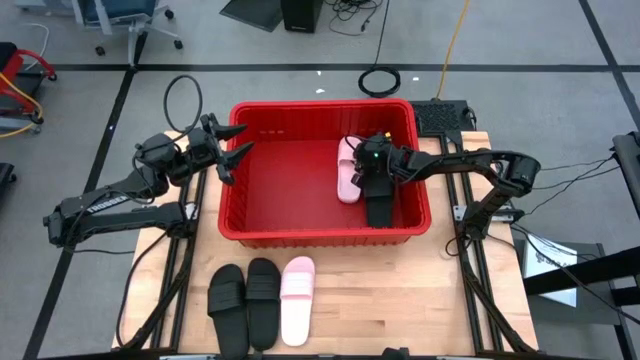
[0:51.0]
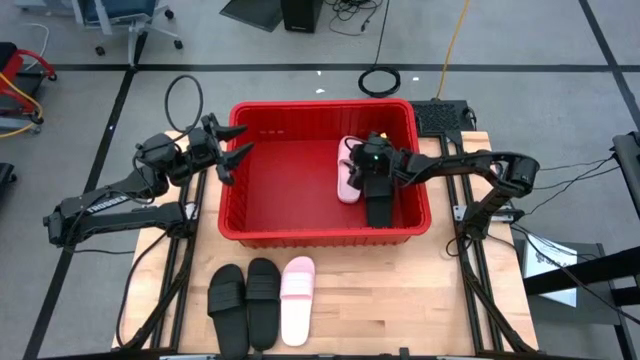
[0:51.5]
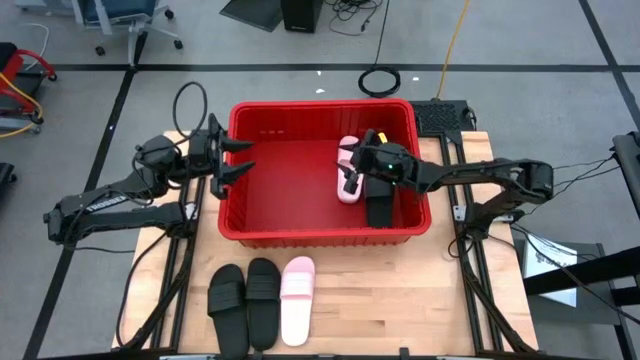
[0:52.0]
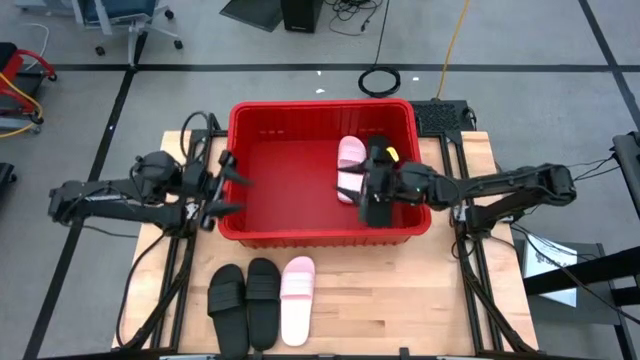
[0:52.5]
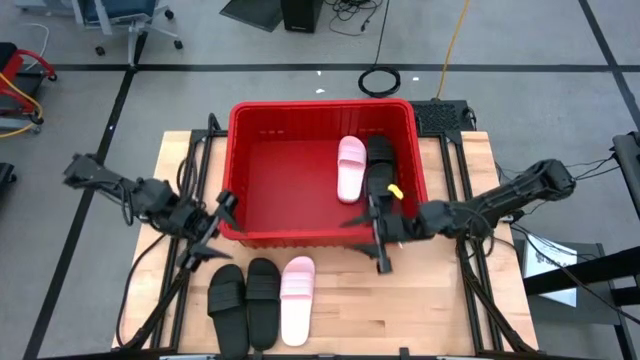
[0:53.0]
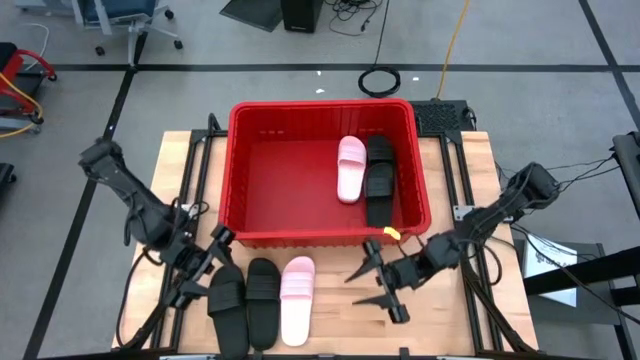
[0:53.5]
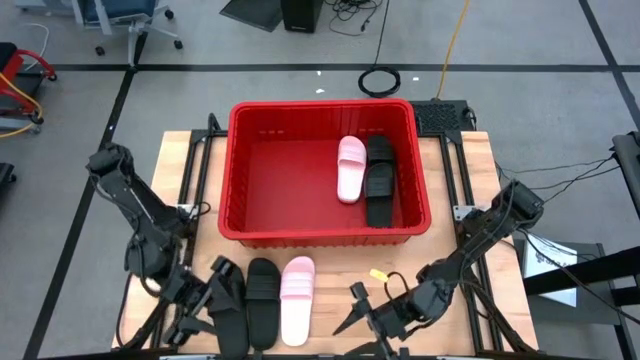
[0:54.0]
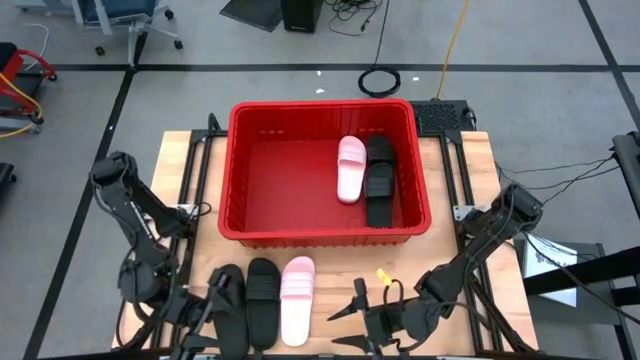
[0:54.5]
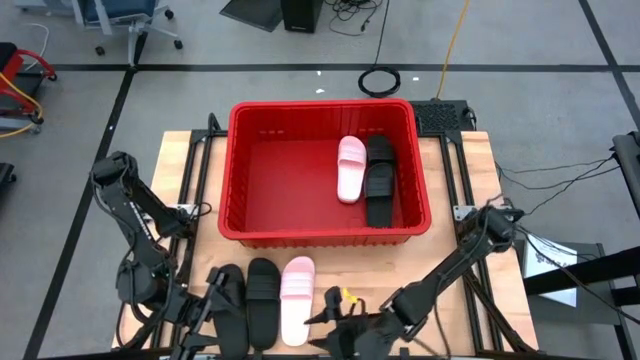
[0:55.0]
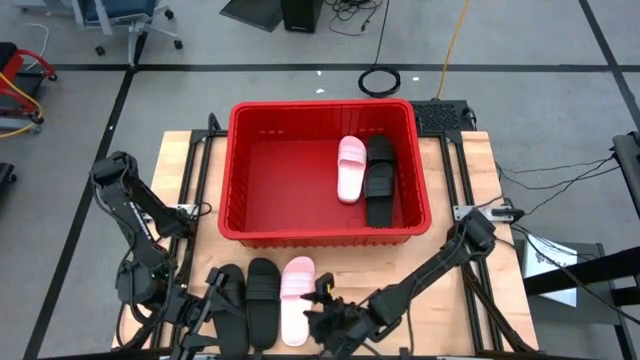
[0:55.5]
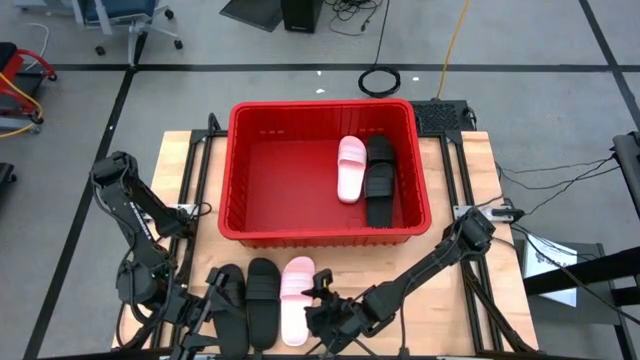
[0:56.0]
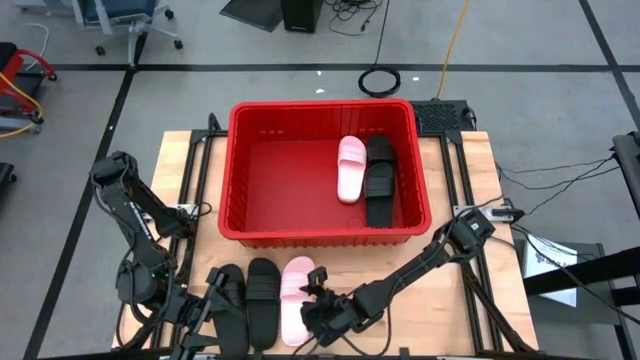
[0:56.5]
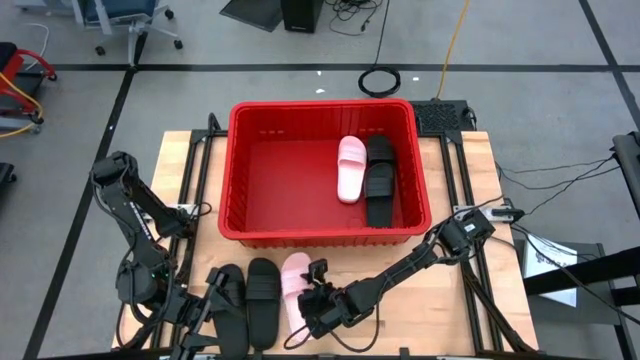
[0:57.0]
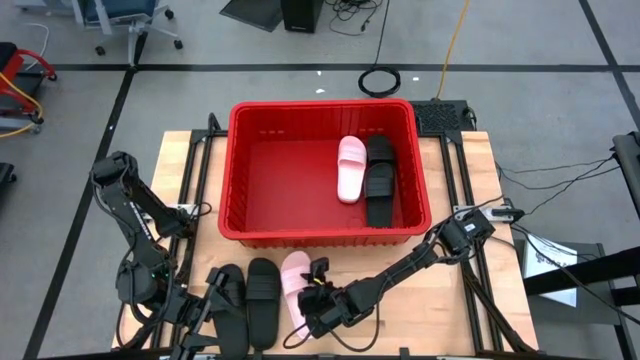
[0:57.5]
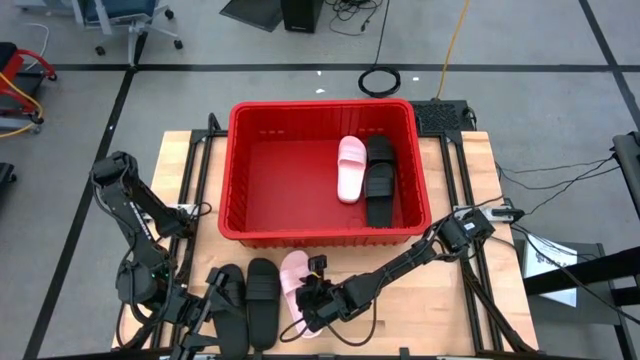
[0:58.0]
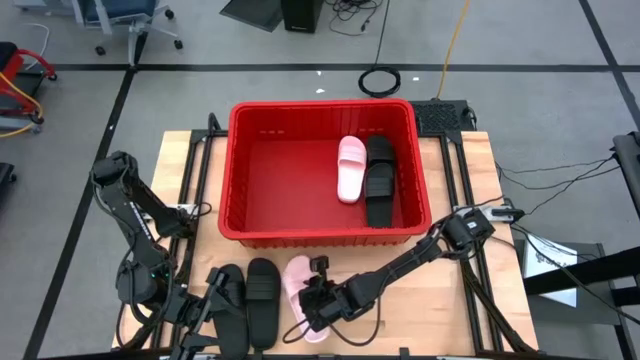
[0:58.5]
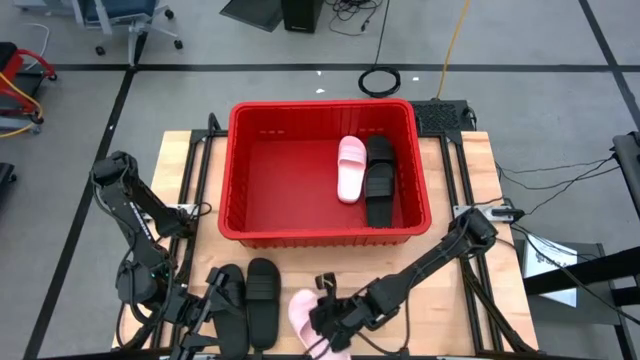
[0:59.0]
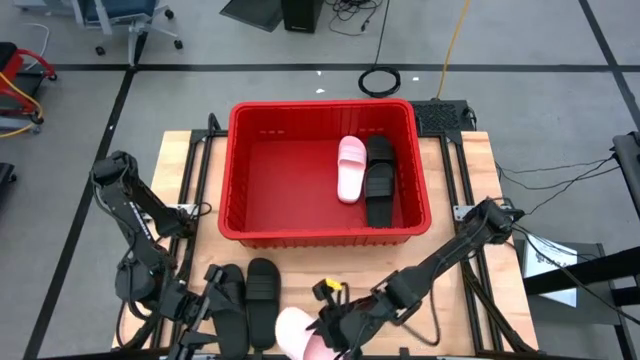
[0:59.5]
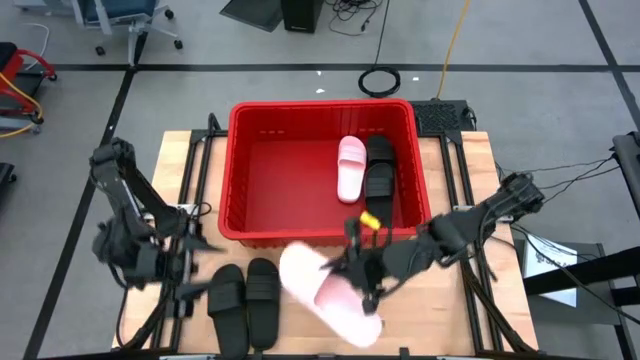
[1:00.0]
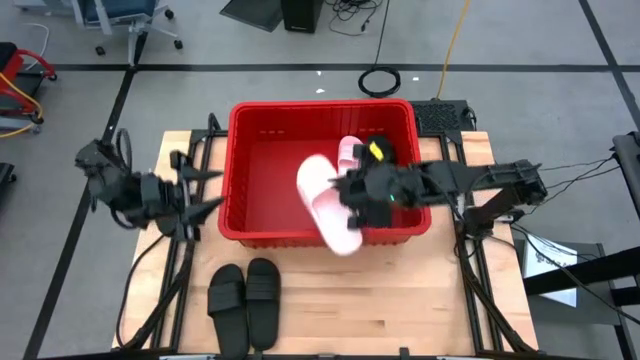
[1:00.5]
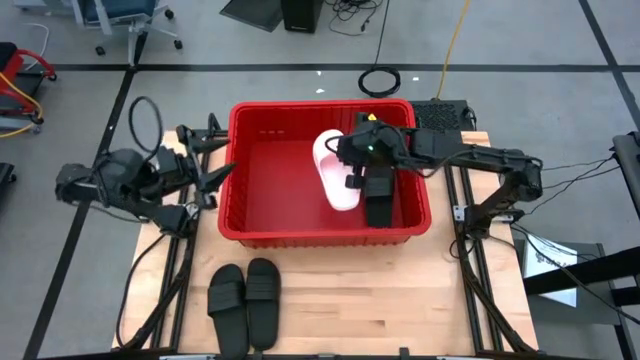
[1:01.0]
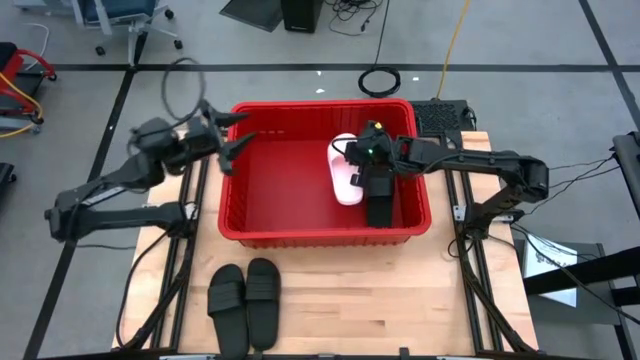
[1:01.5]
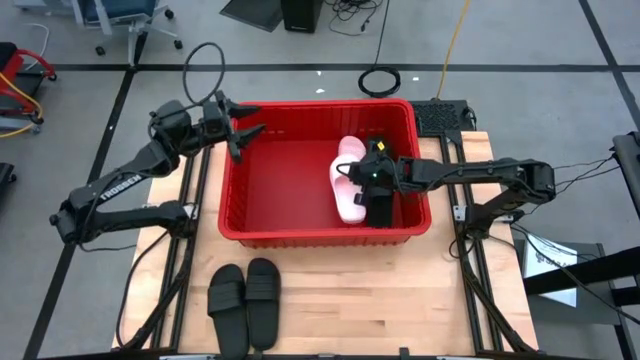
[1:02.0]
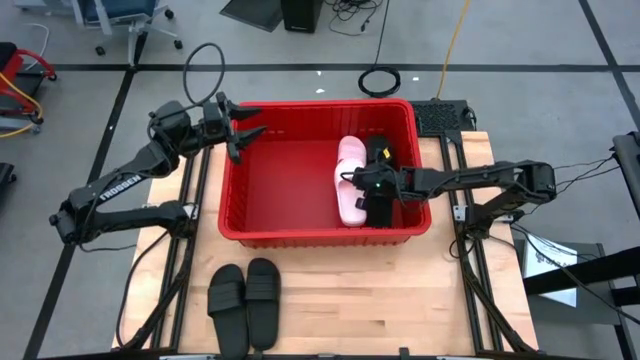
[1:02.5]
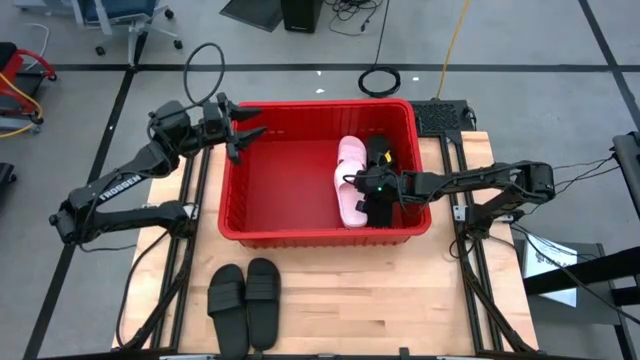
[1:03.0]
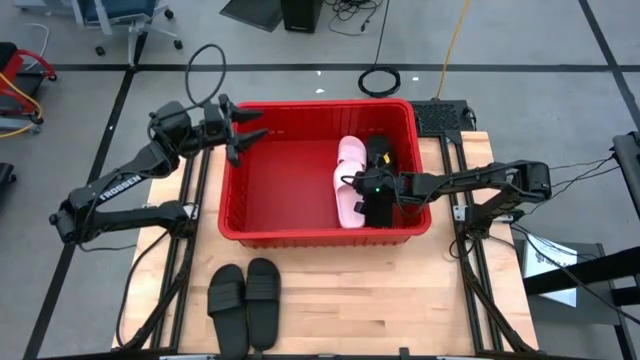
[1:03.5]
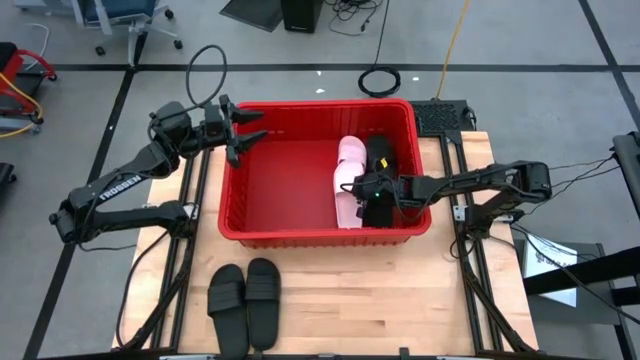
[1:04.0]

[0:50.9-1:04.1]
Task: Pick and place slides into bin
Put the pink slide into the red bin

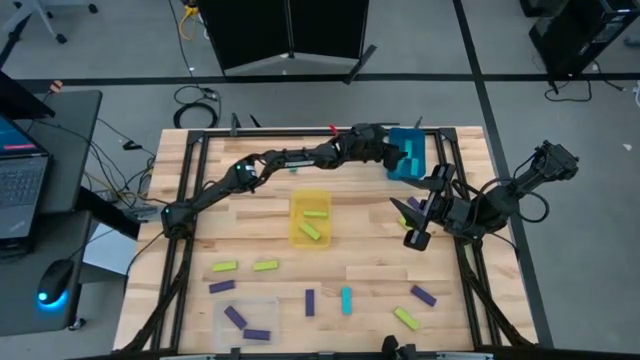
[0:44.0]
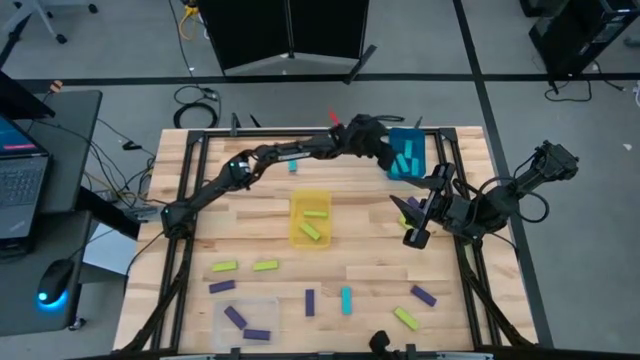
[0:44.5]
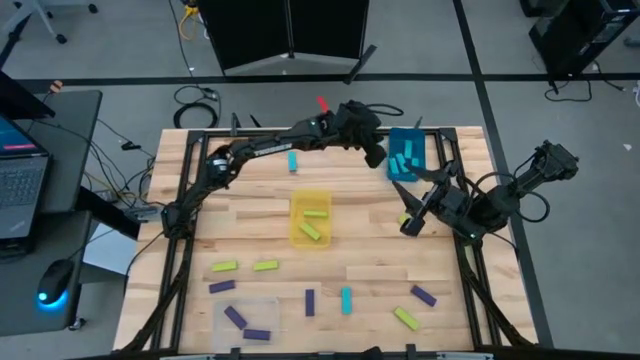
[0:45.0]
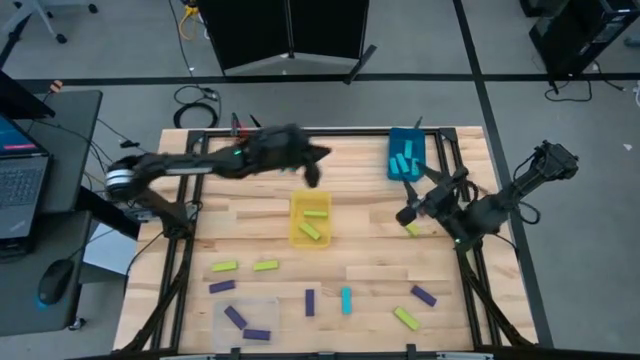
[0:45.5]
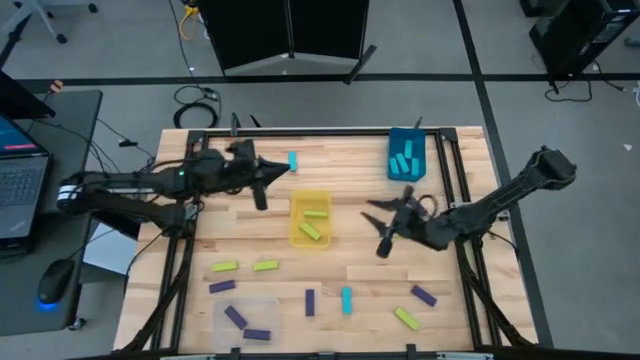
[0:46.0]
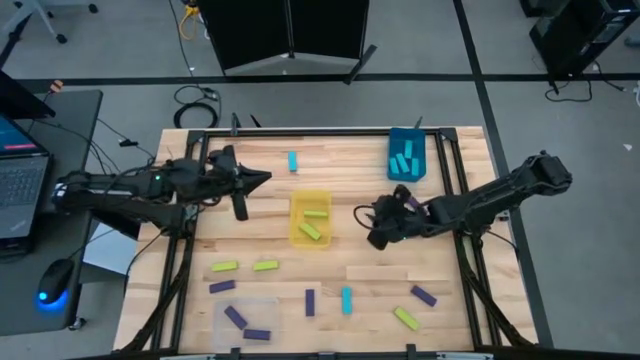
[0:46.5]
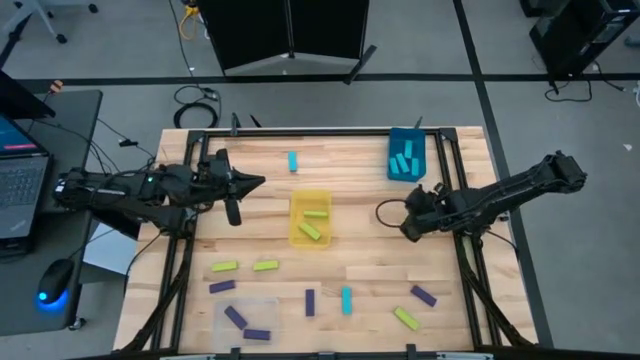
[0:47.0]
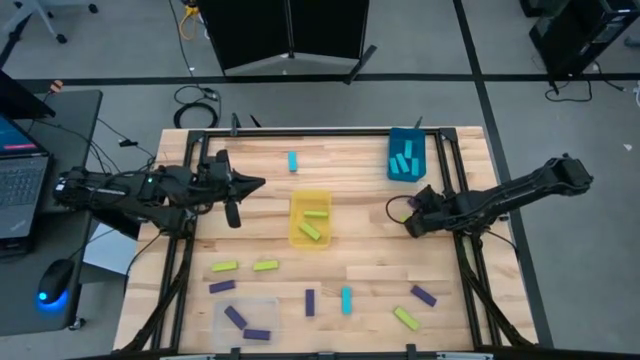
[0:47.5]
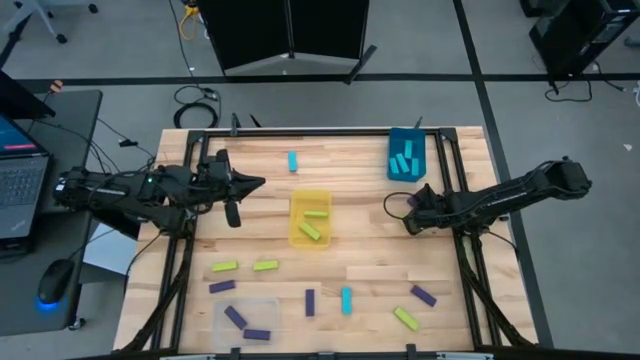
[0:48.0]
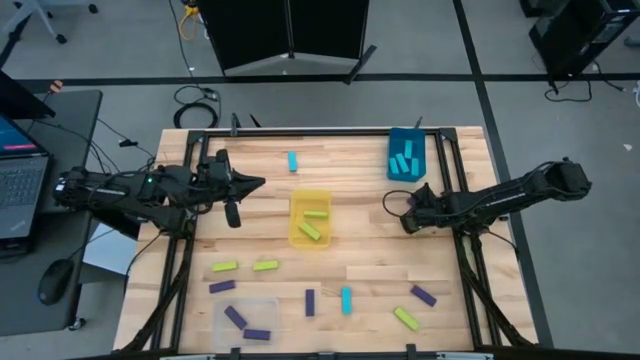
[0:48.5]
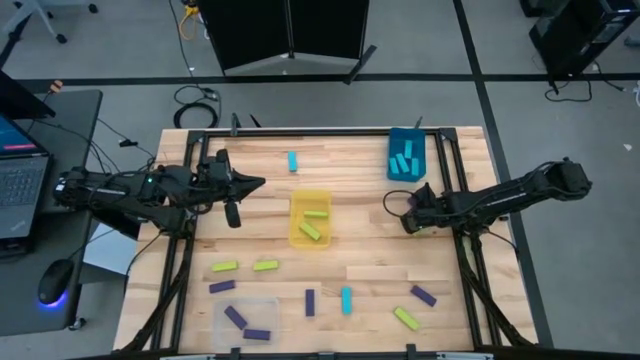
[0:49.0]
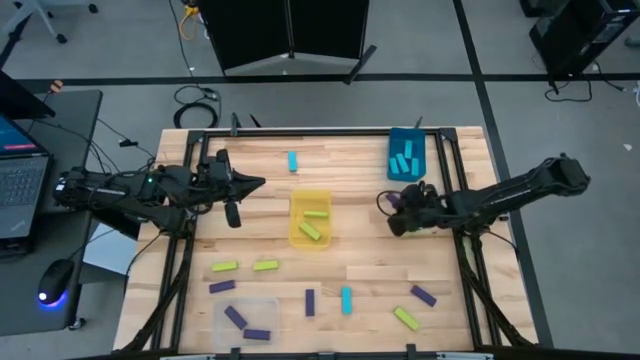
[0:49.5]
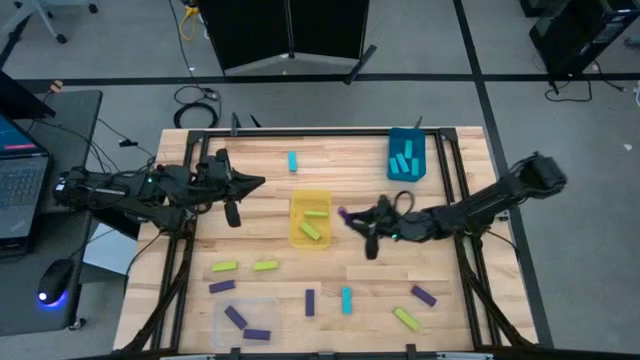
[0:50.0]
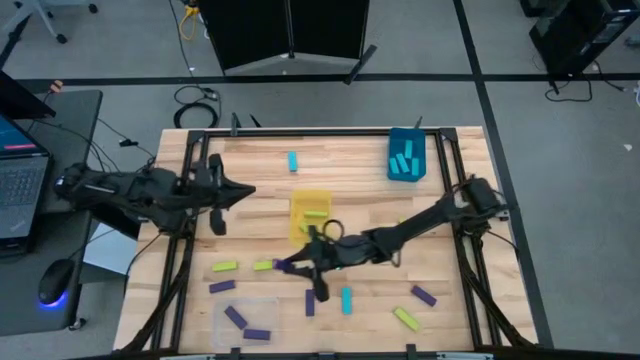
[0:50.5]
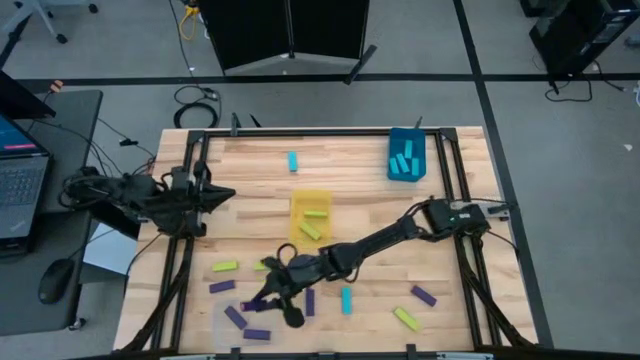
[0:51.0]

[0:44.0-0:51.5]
Task: Sort blocks
Put the purple block into the transparent bin
